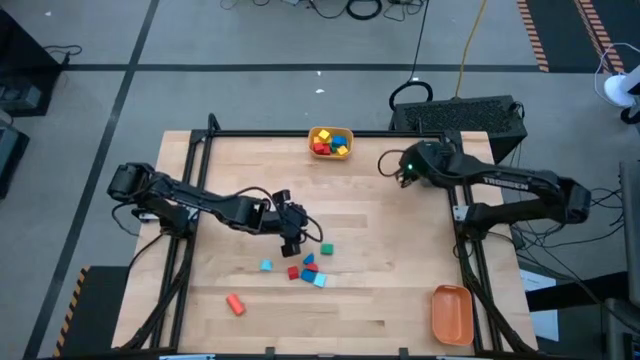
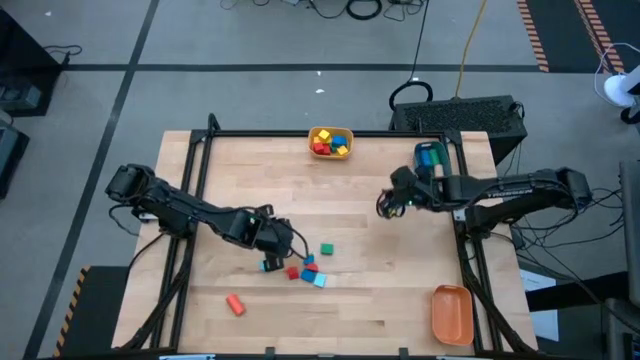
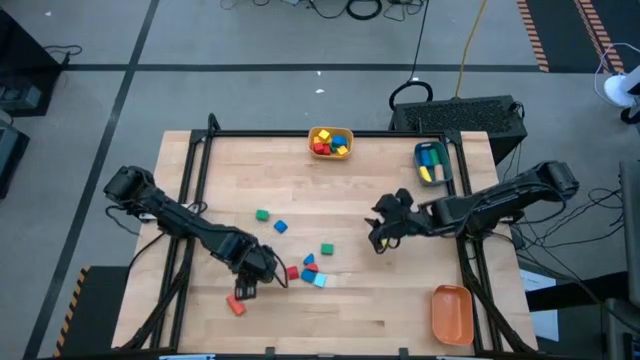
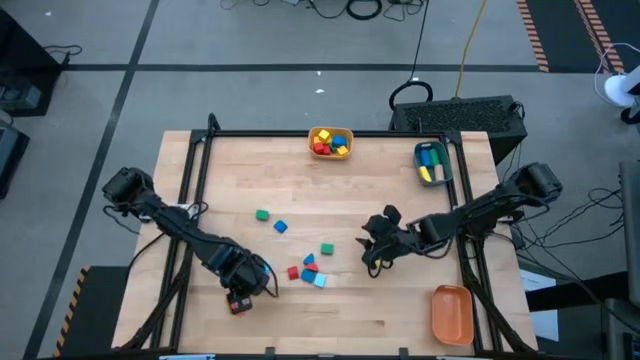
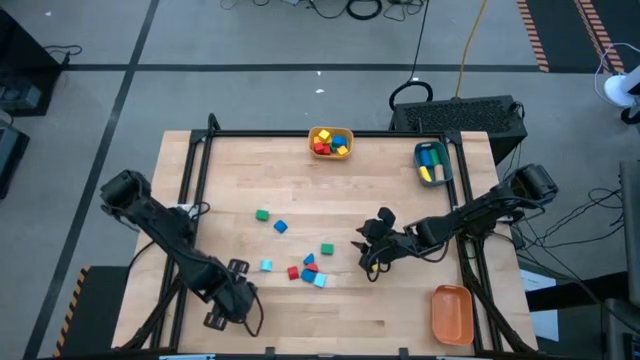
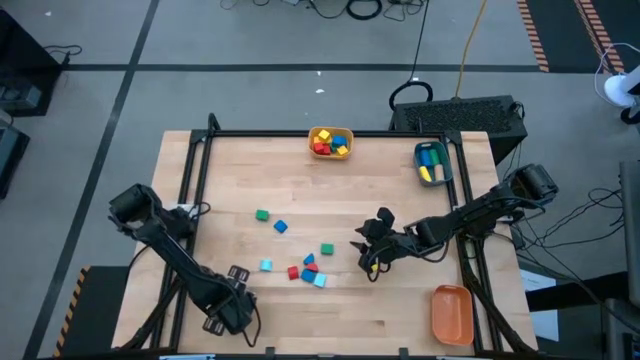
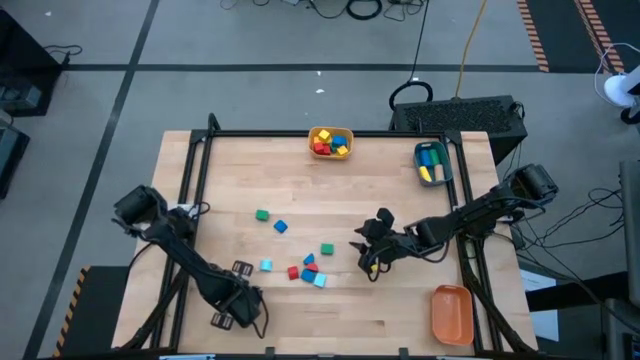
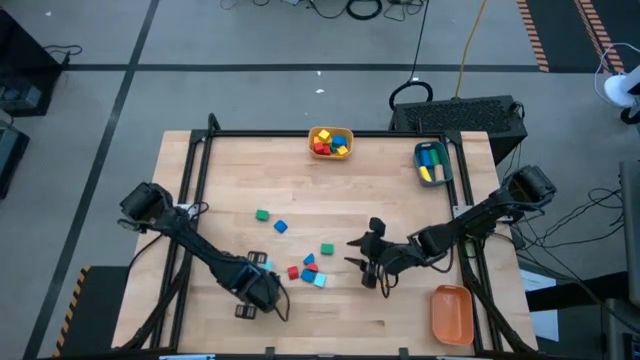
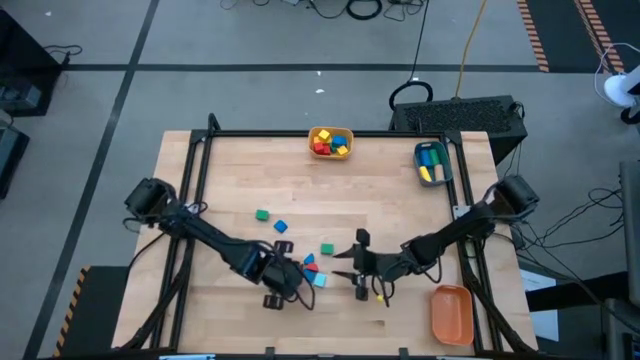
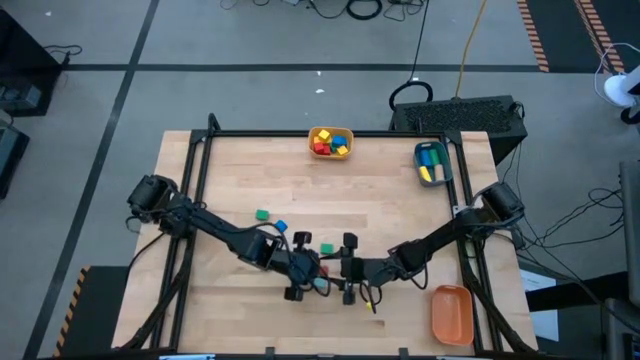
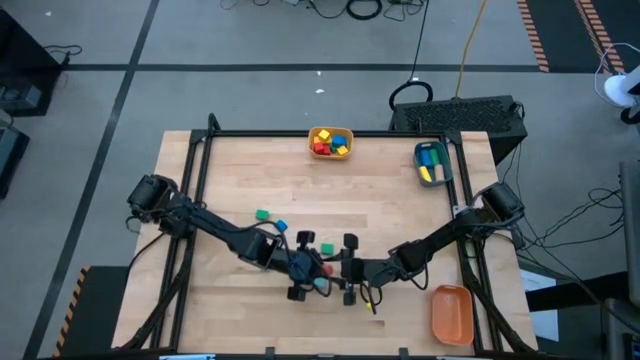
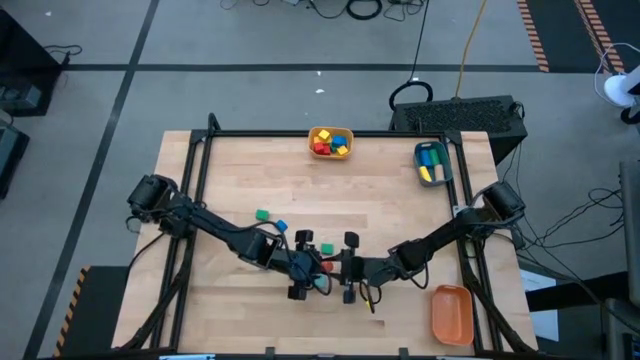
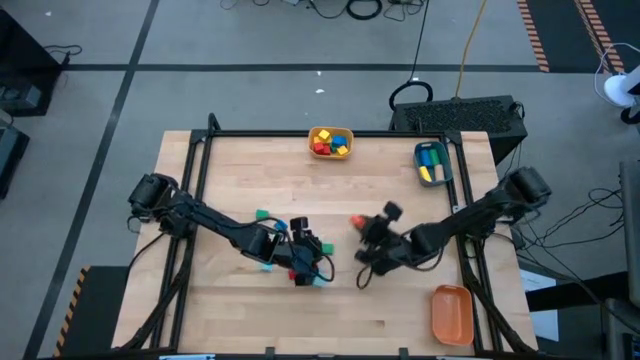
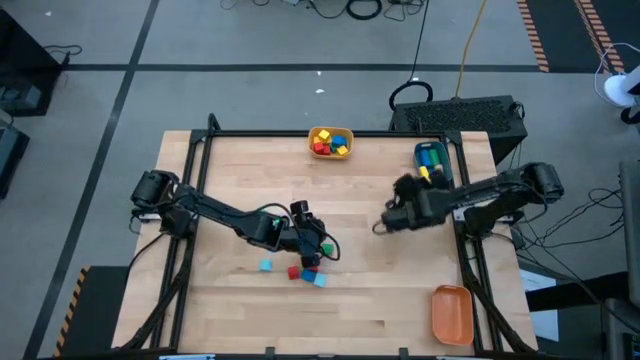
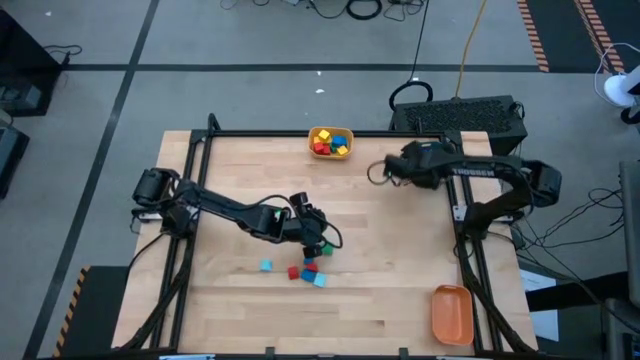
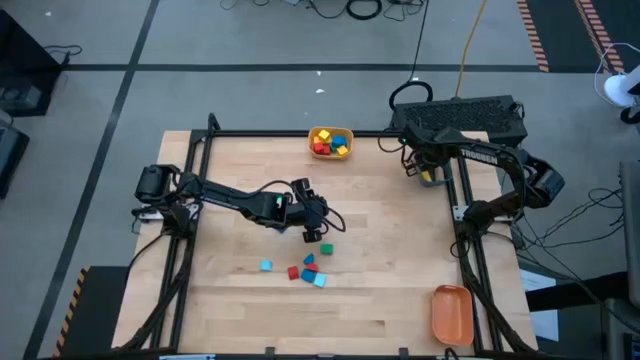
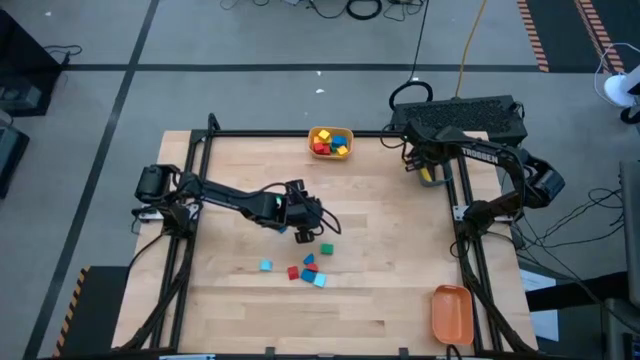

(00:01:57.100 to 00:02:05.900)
Task: Sort blocks by size
Put the orange cylindrical block into the blue bin

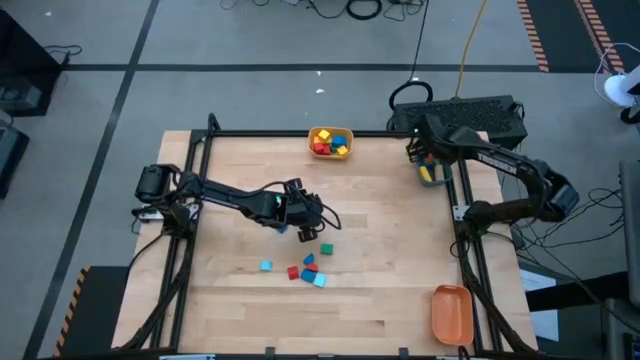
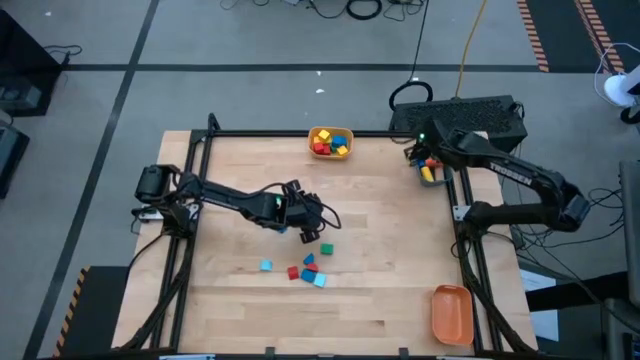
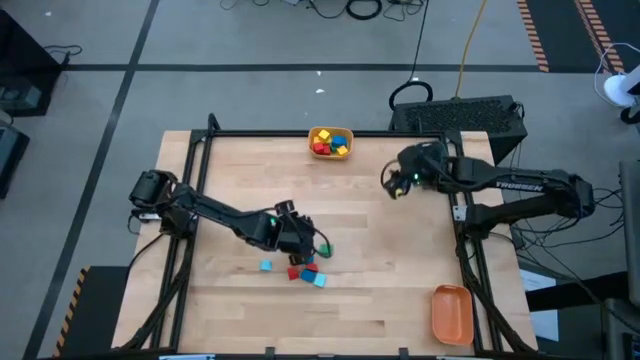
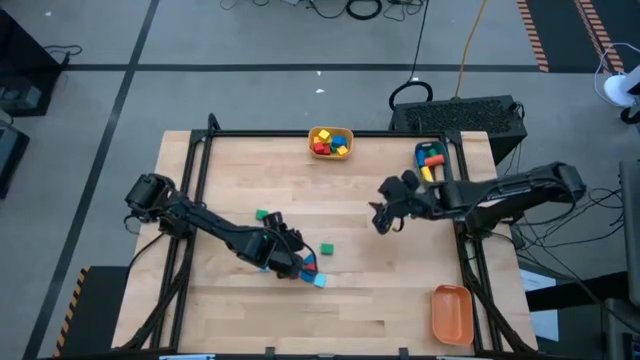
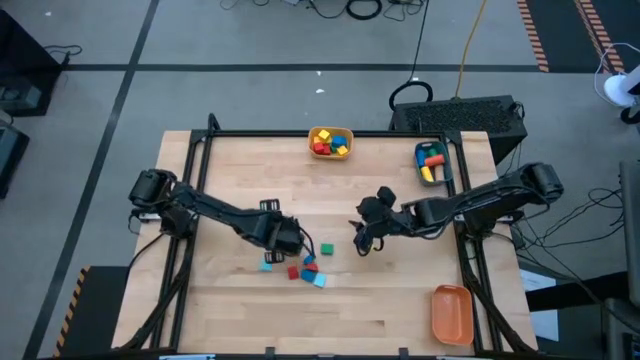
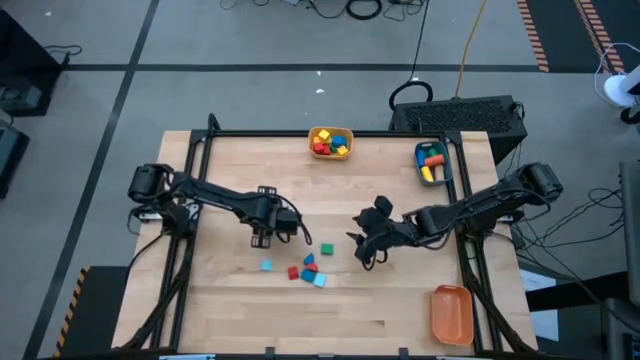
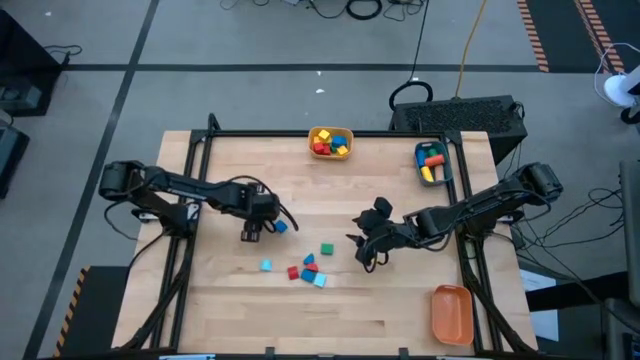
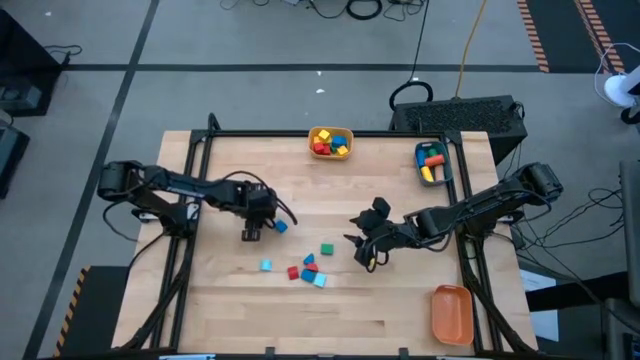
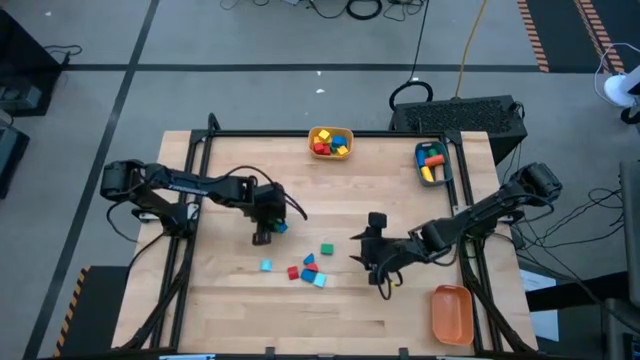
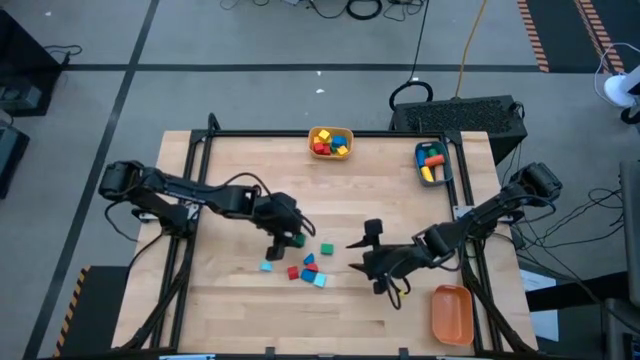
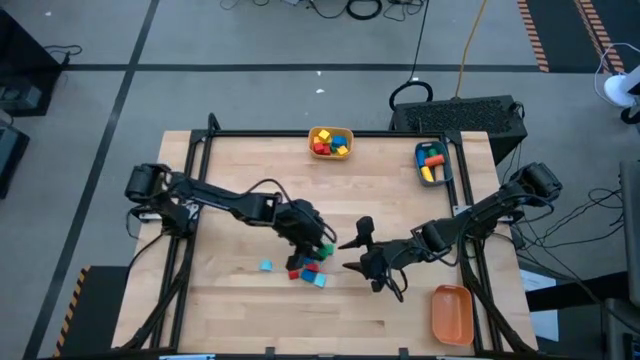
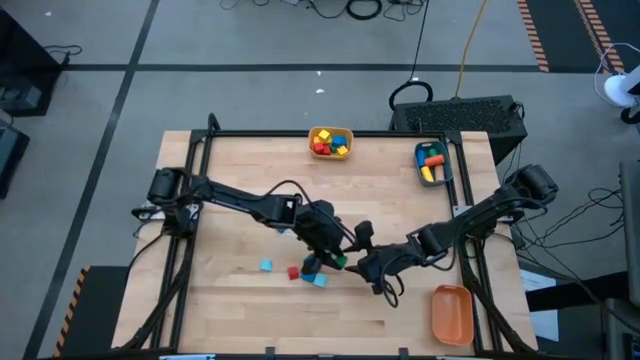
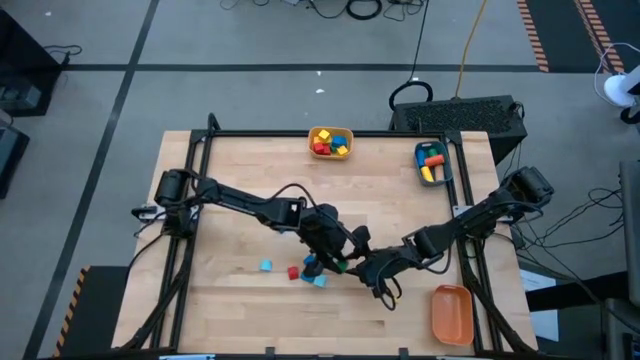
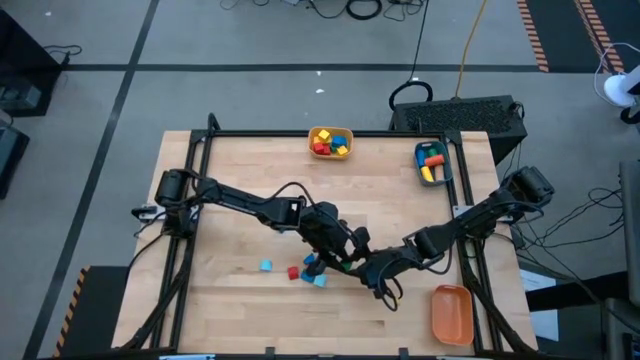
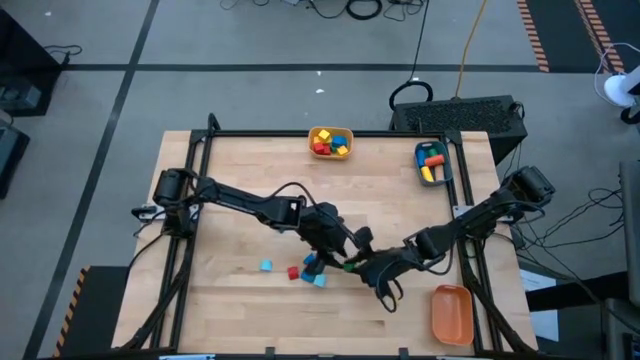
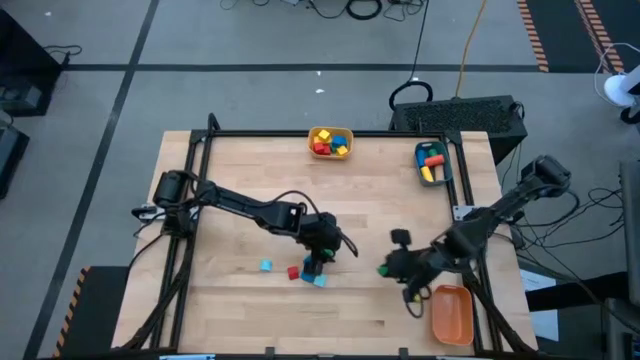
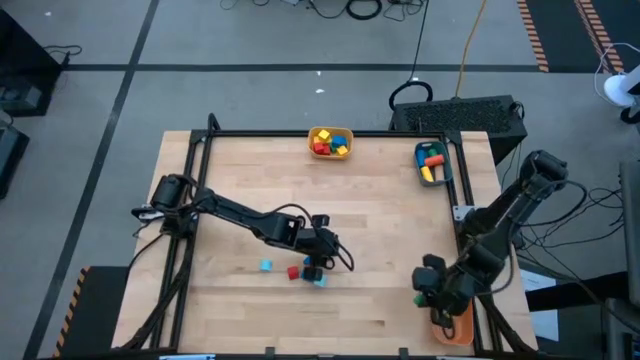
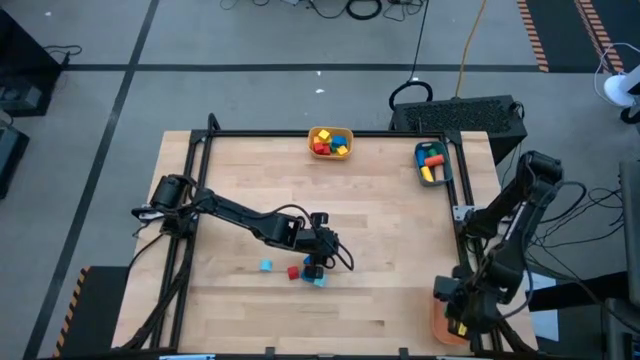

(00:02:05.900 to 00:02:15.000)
Put the green half circle block into the orange bin

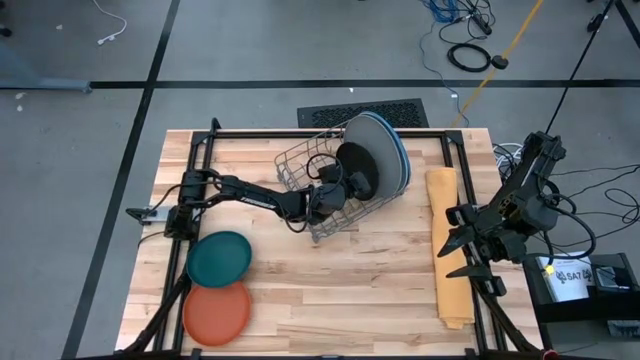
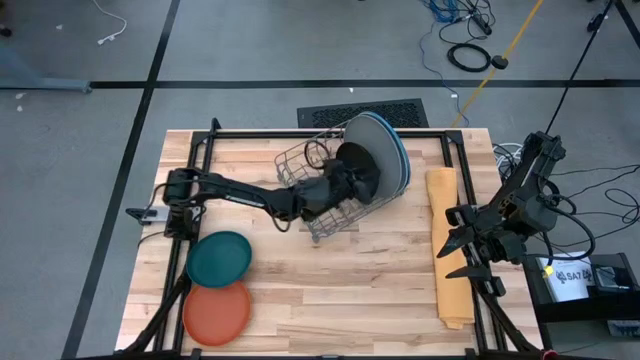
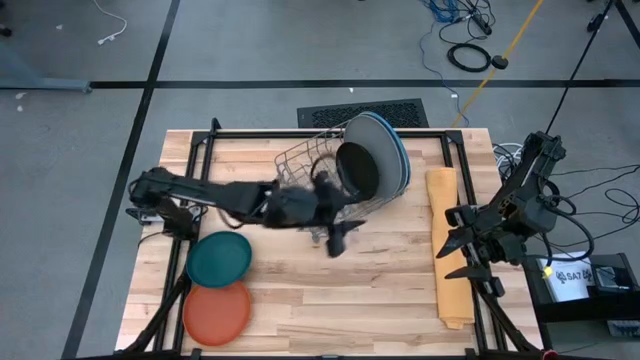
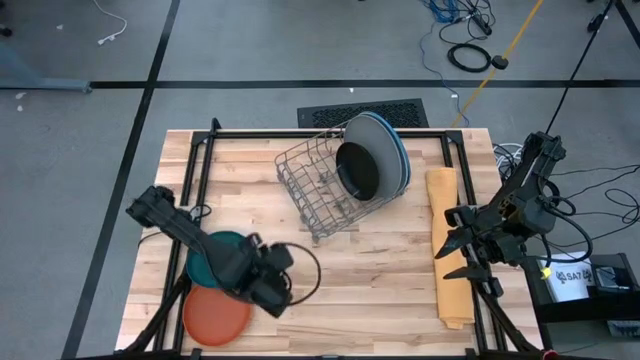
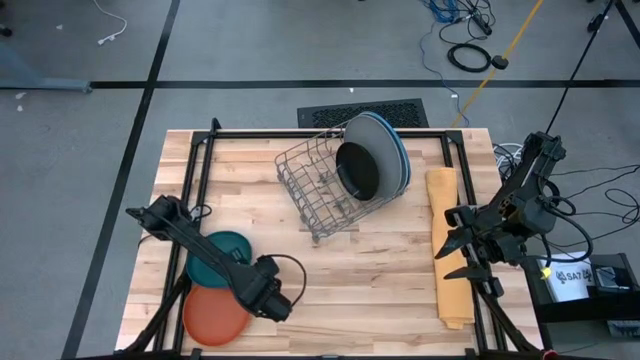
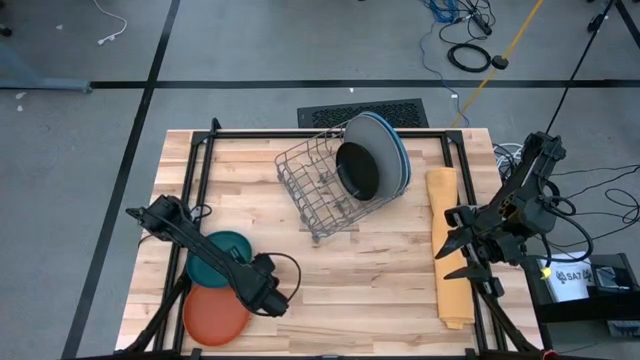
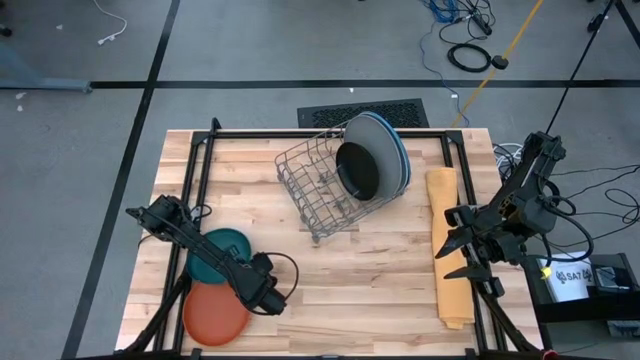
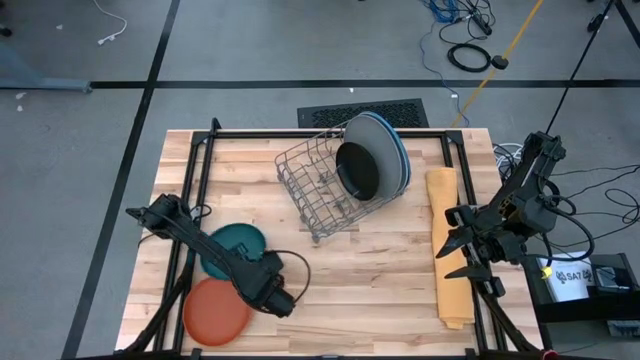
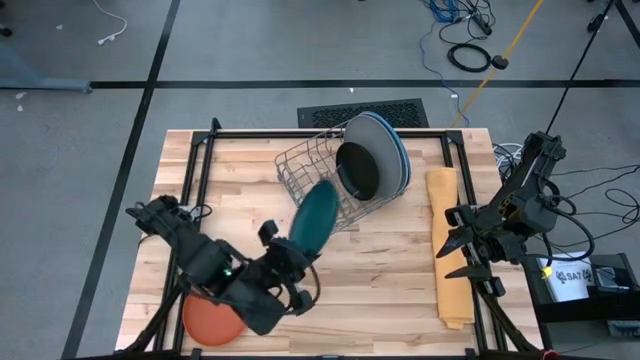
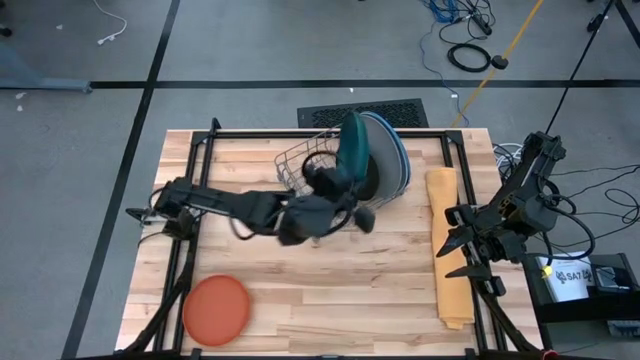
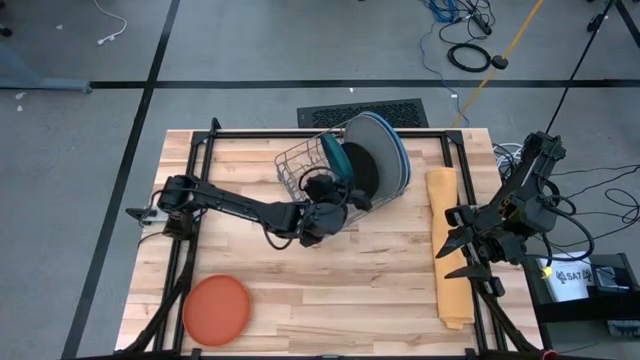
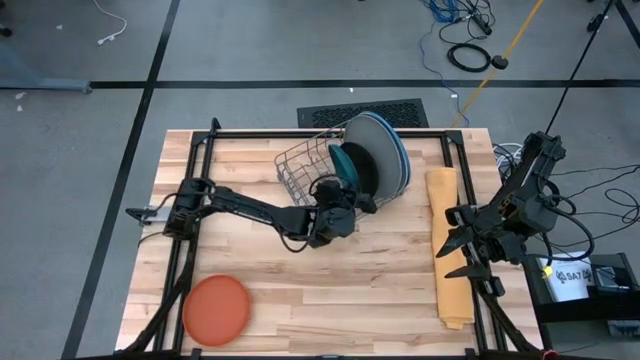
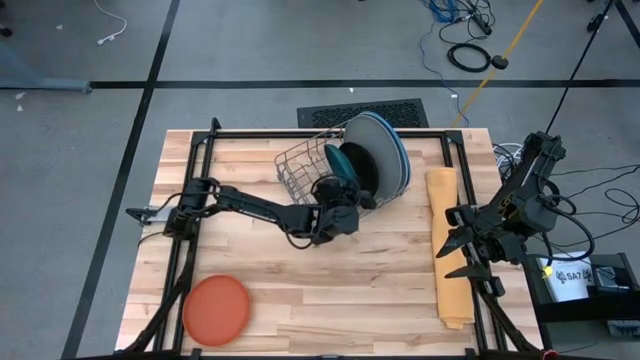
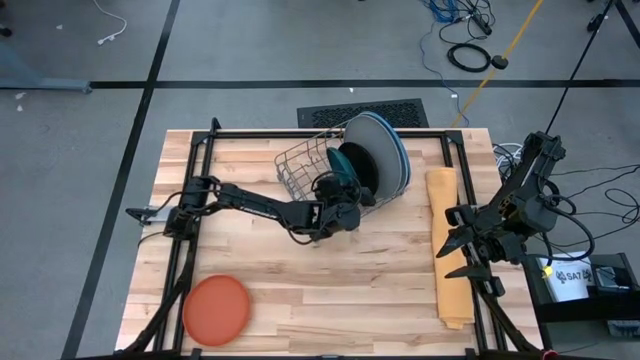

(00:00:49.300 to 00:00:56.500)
Task: Sort dishes
Put the dark green plate into the dish rack
